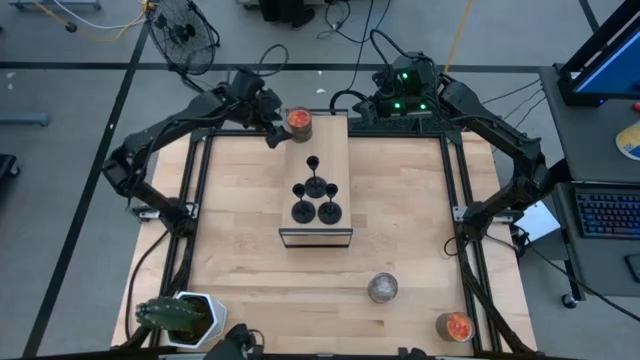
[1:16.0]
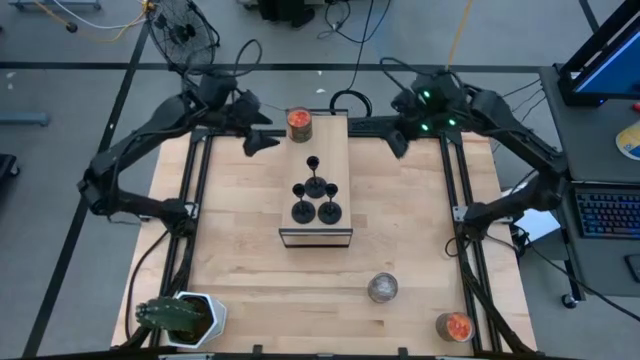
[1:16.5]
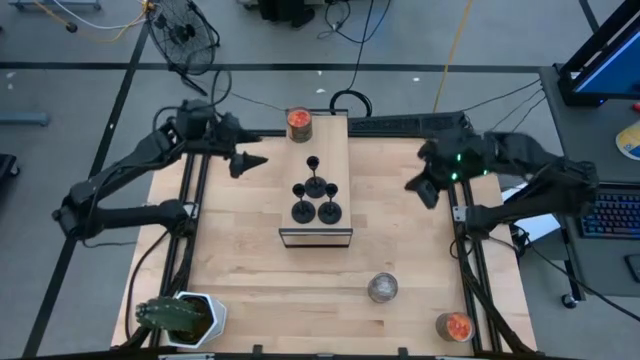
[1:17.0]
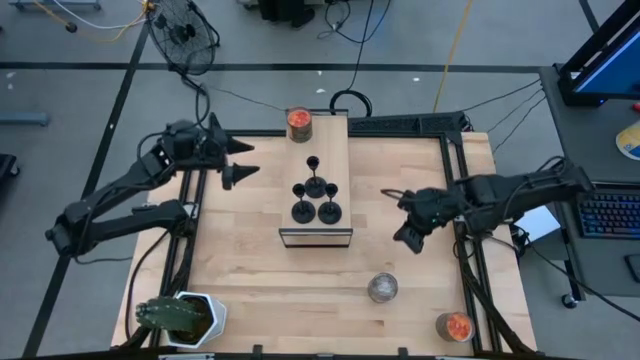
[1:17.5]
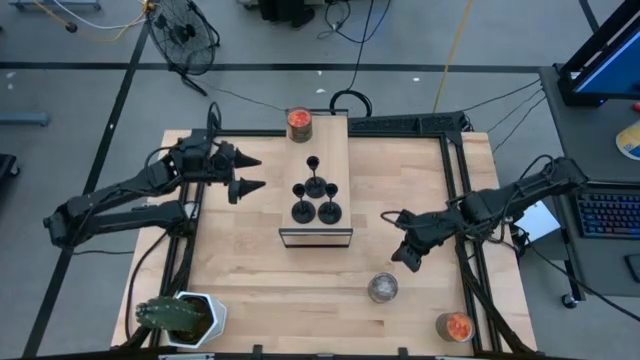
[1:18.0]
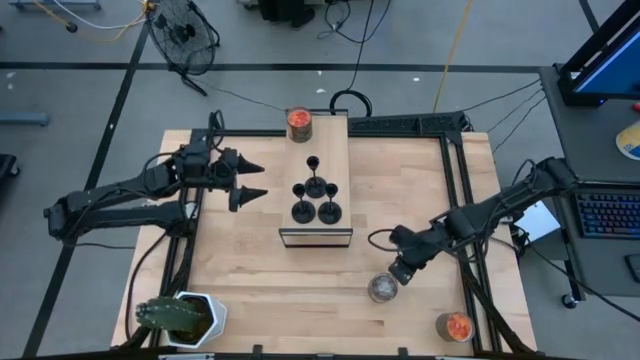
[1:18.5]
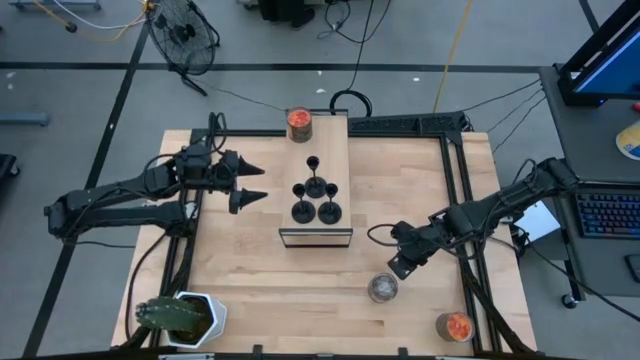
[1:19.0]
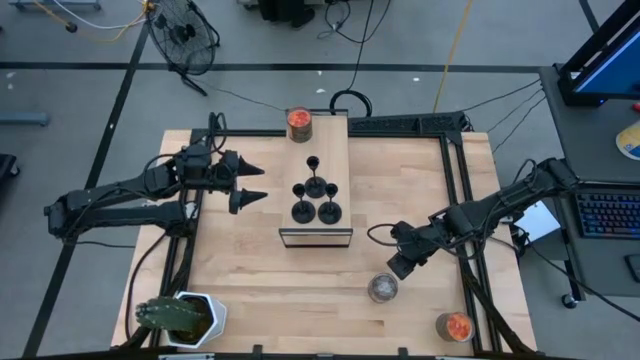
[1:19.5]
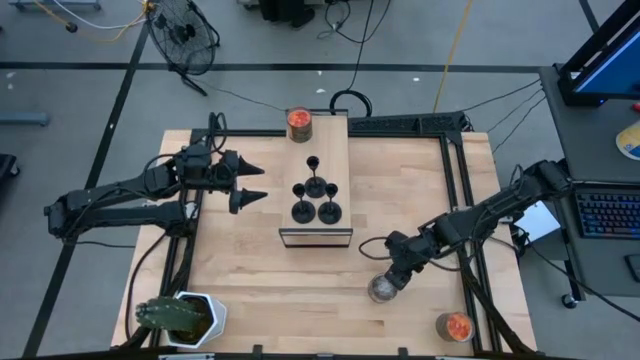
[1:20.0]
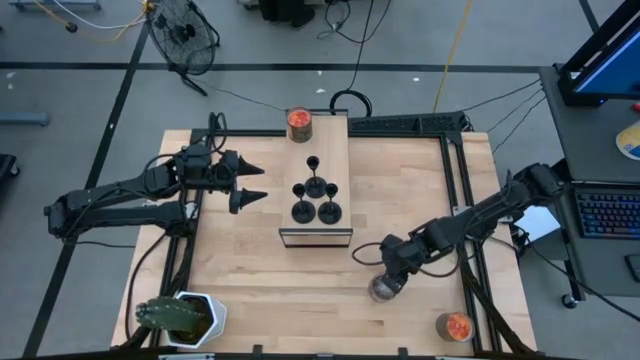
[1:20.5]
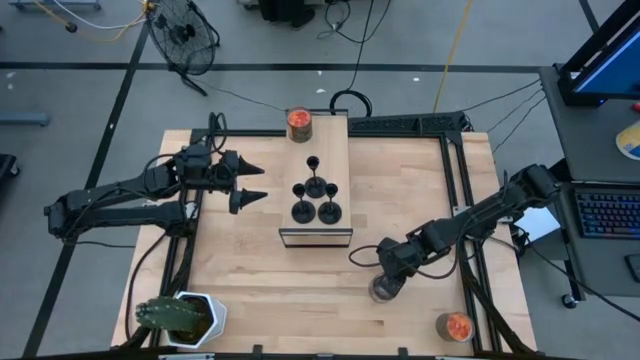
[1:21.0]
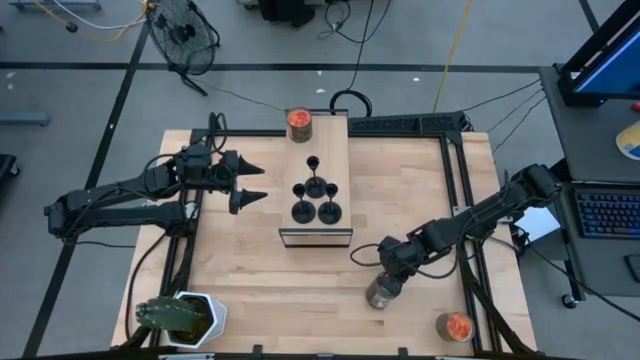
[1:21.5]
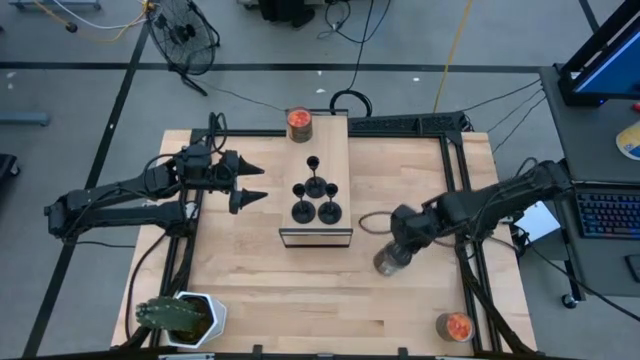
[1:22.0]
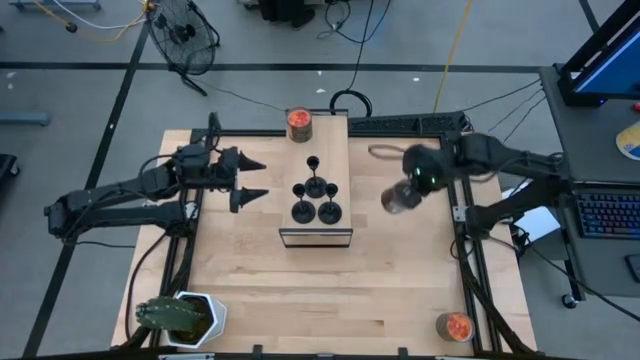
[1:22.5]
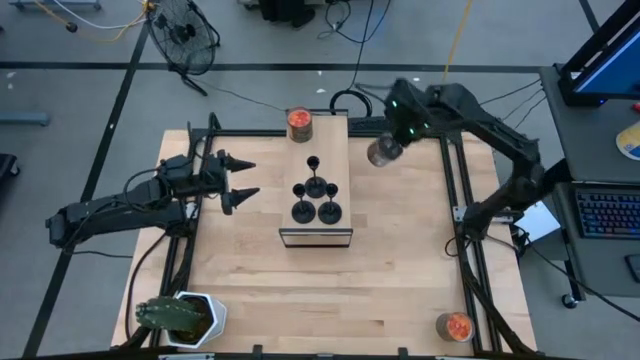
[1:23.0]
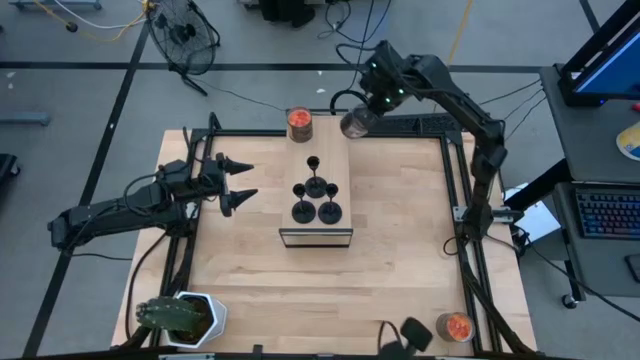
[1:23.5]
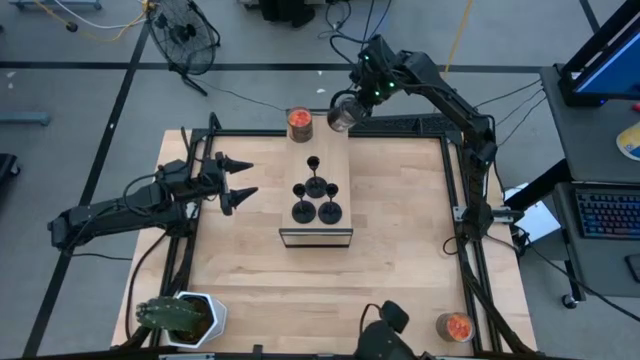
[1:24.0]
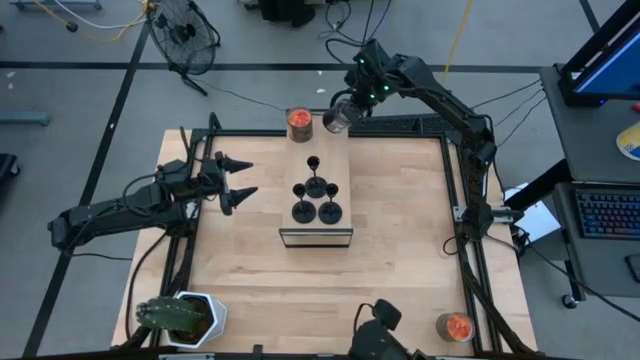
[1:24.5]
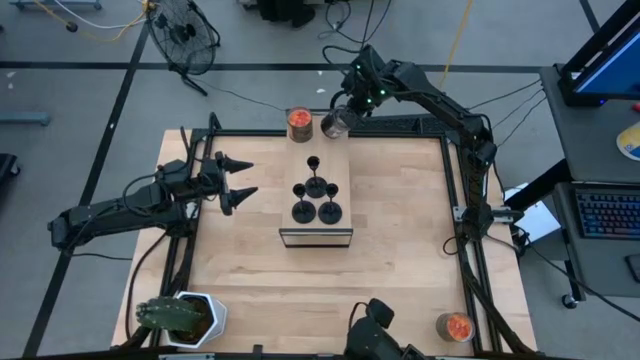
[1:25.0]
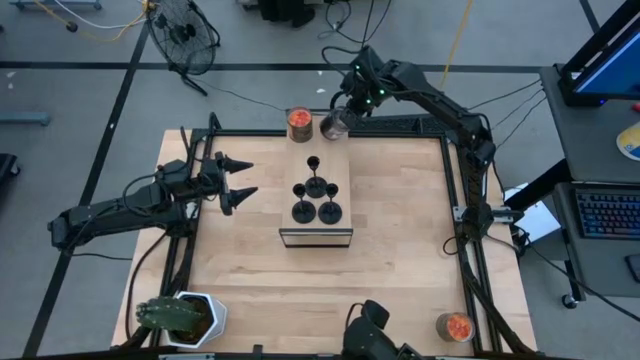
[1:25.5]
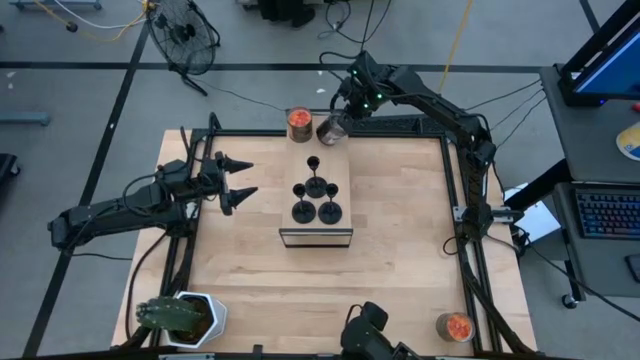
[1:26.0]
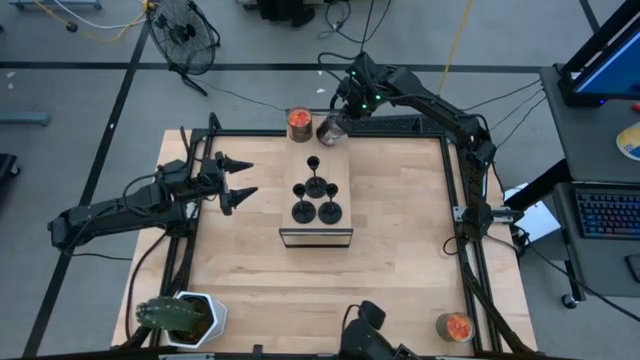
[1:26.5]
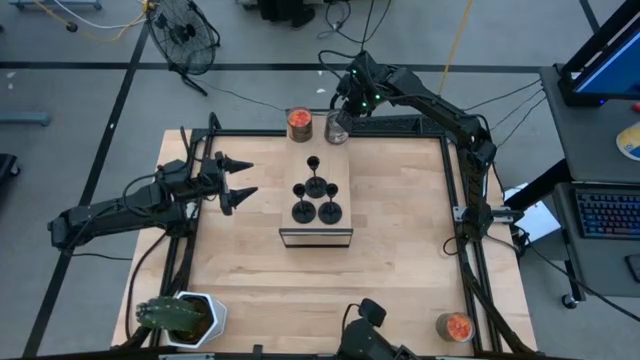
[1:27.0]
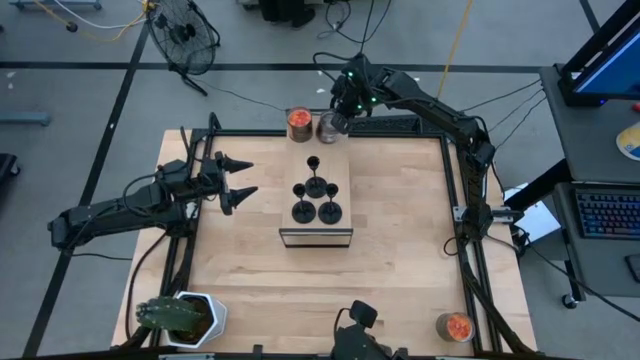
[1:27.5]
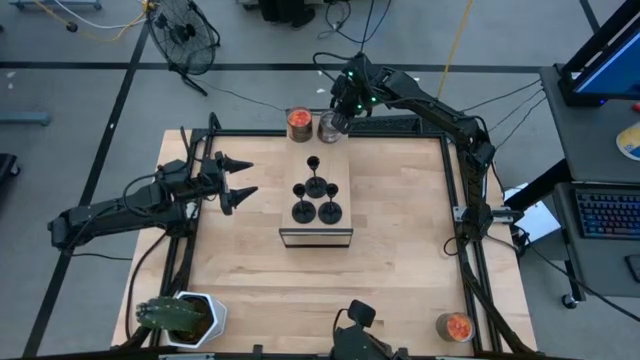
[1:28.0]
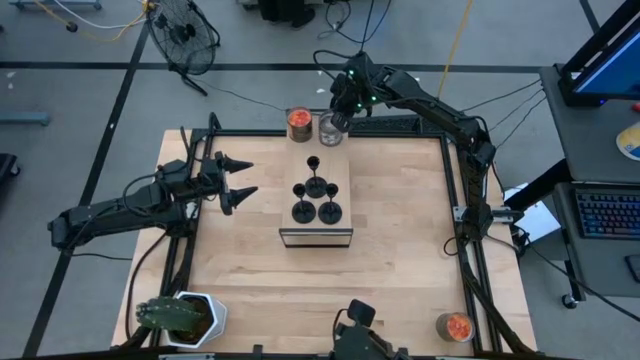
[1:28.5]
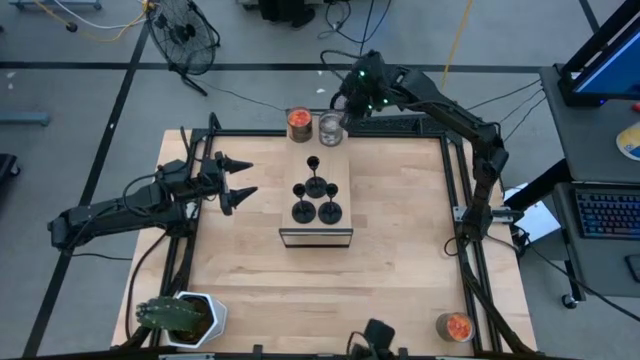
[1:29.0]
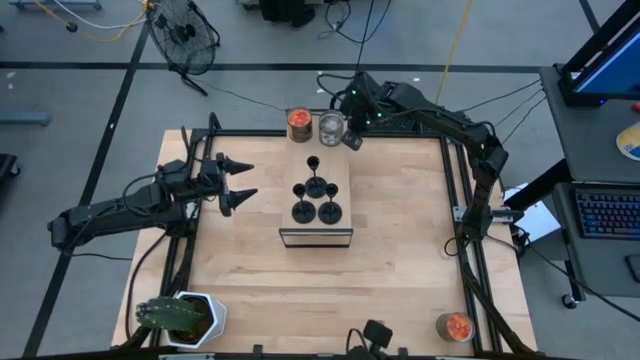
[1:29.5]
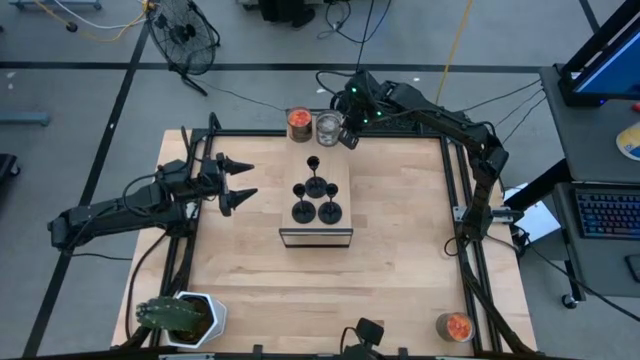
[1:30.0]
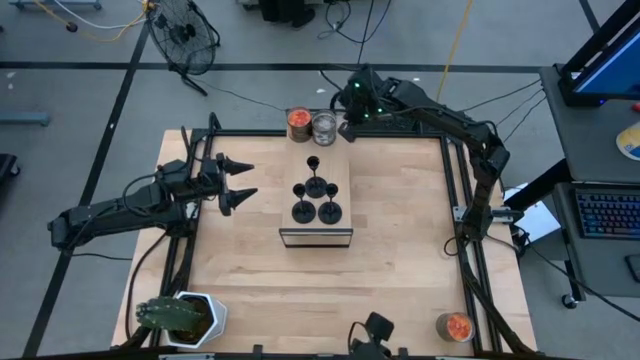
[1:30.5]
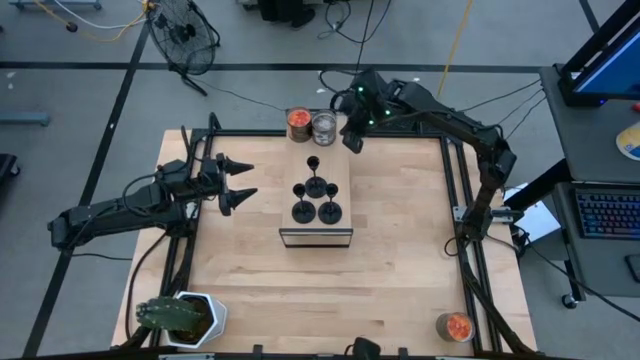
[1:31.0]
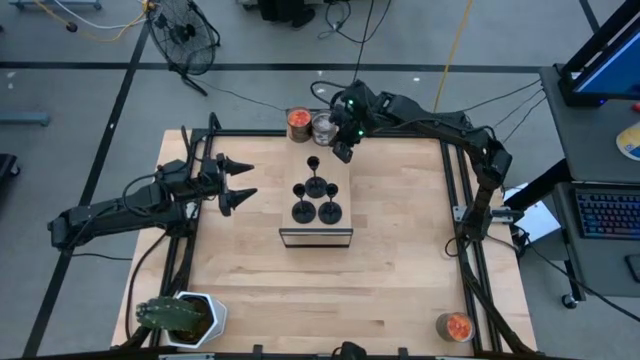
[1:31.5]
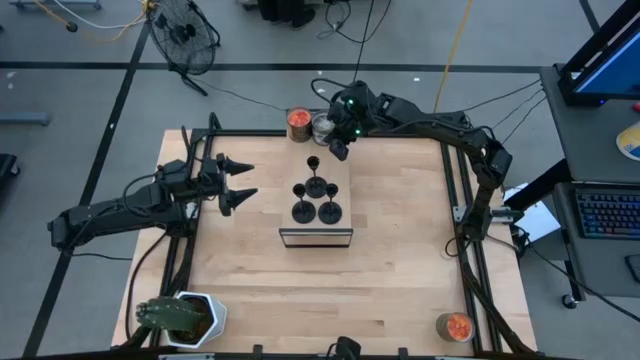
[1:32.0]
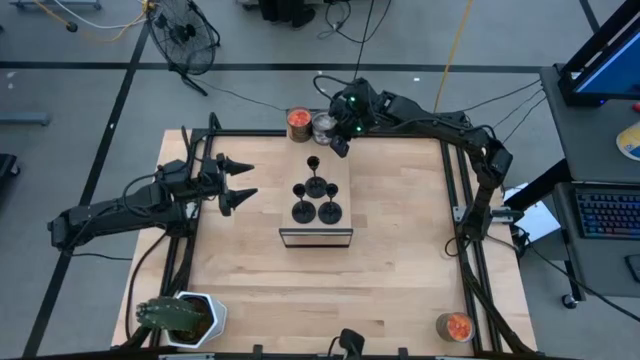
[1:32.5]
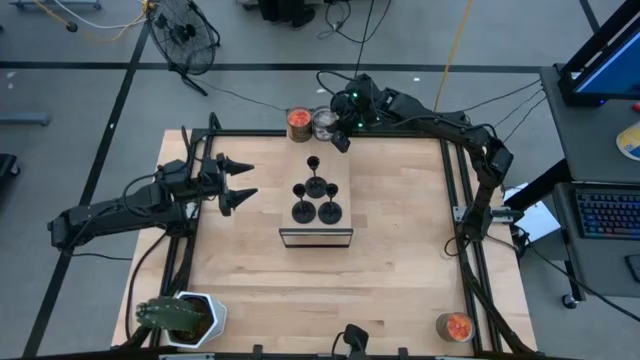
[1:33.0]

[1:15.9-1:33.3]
Task: Pick & Place candle stick holders
Put the brown scented candle on the shelf

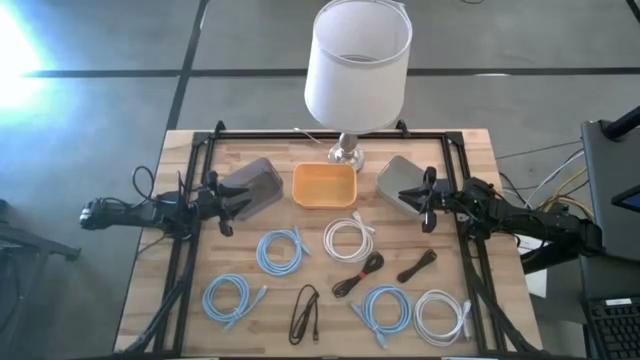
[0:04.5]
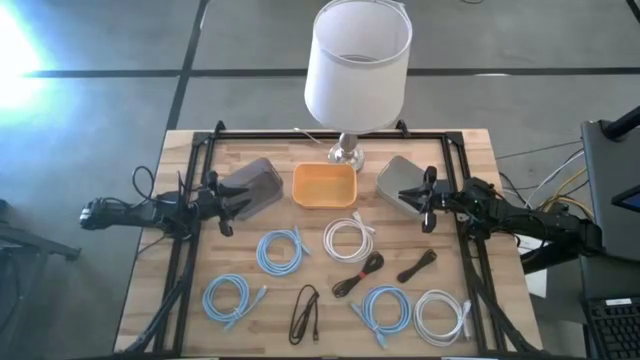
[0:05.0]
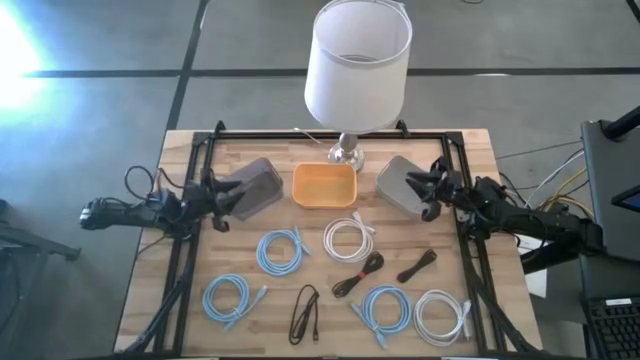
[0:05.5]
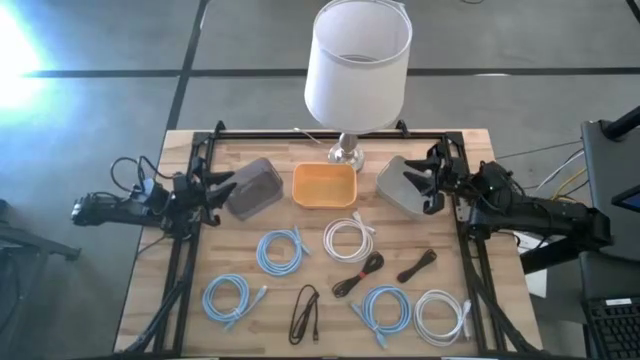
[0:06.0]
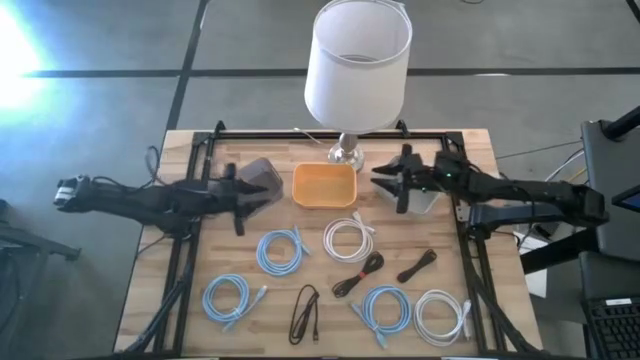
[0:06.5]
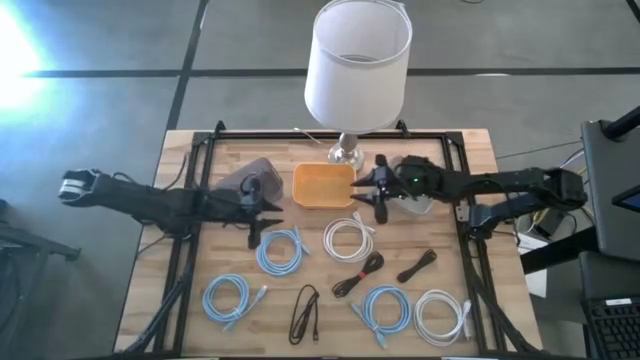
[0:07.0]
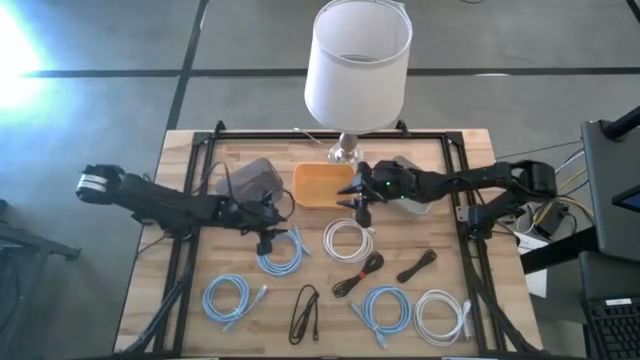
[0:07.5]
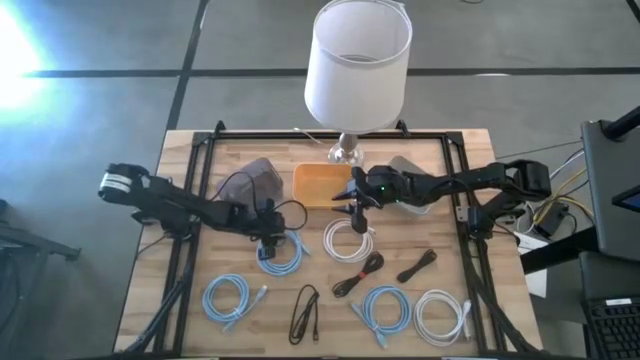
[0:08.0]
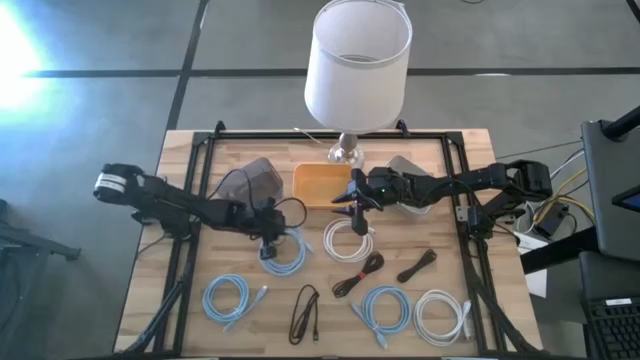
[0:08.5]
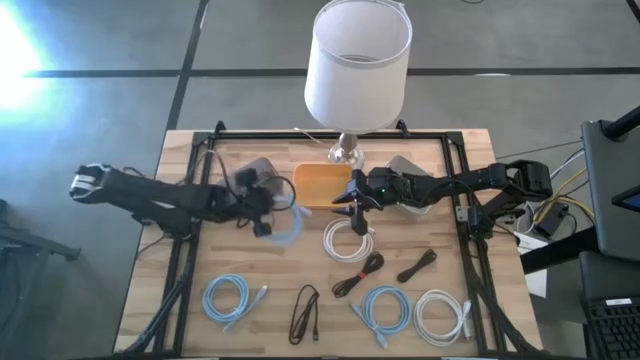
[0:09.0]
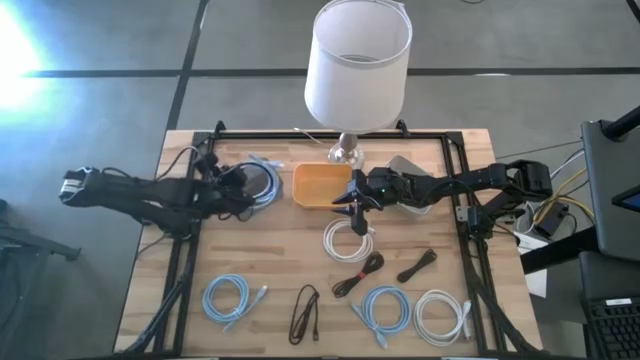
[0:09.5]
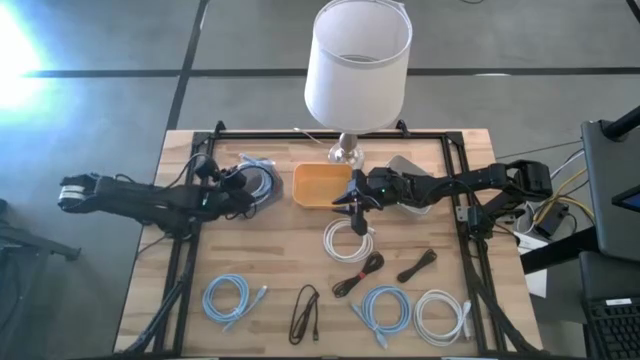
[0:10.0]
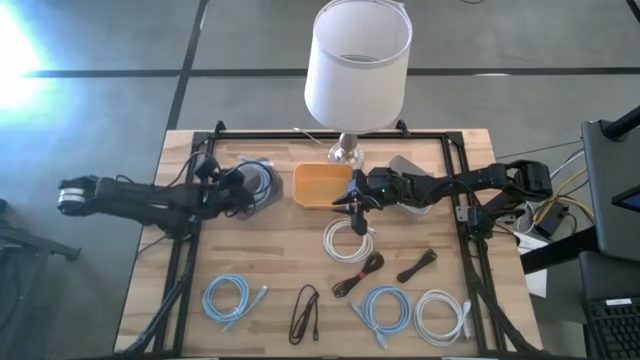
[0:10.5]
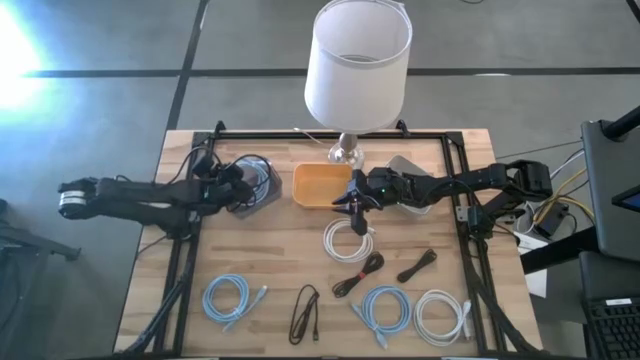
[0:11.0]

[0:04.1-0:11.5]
Task: Sort HDMI cables
Put the top left blue HDMI cable into the black bin
